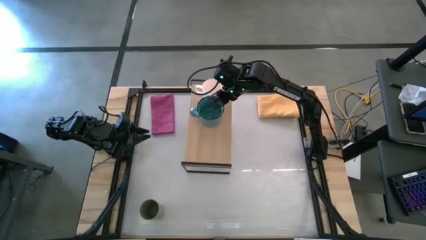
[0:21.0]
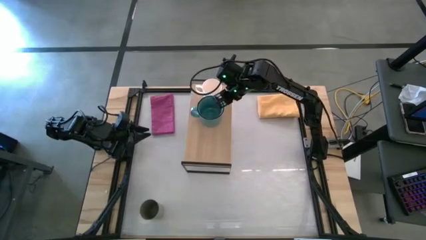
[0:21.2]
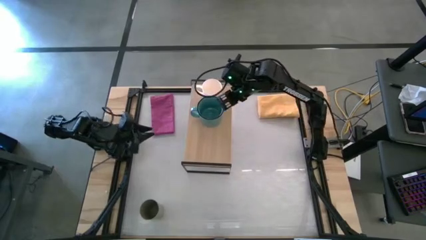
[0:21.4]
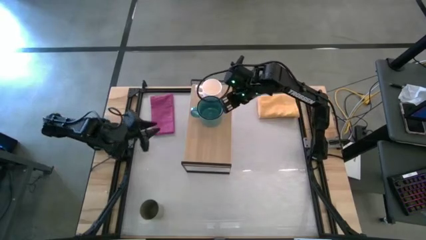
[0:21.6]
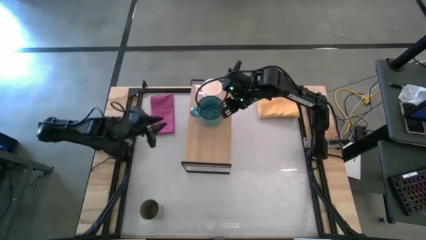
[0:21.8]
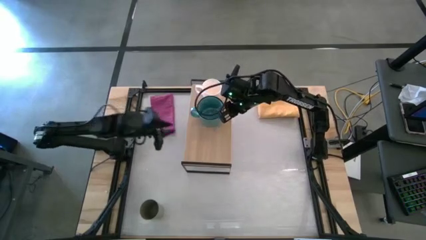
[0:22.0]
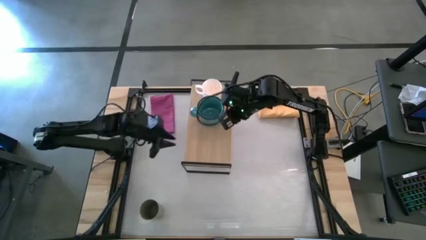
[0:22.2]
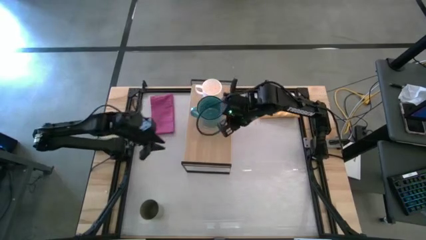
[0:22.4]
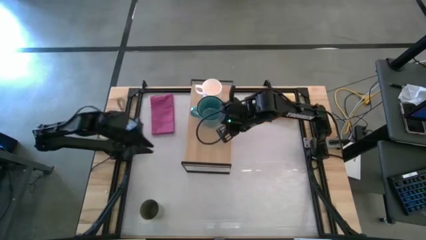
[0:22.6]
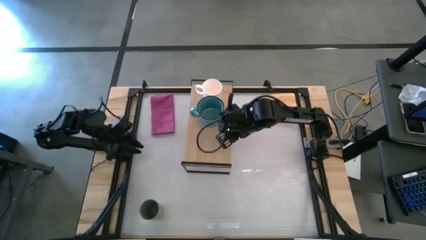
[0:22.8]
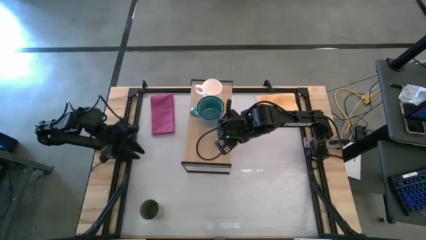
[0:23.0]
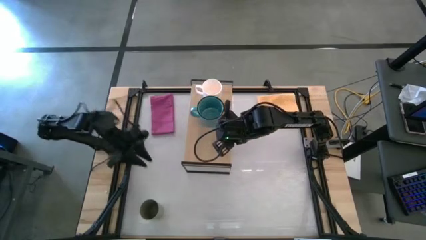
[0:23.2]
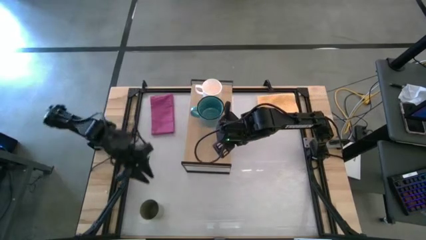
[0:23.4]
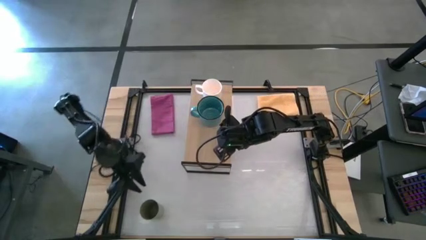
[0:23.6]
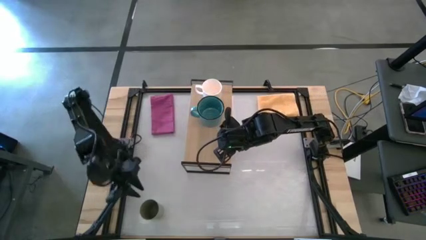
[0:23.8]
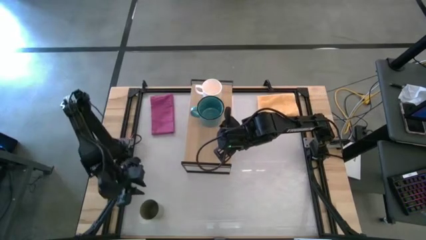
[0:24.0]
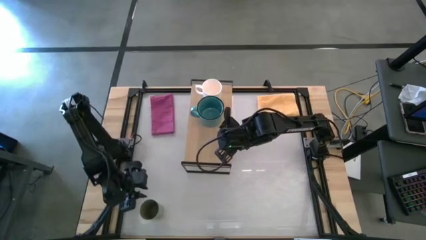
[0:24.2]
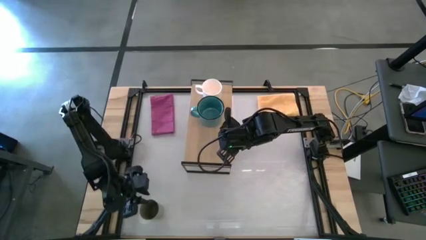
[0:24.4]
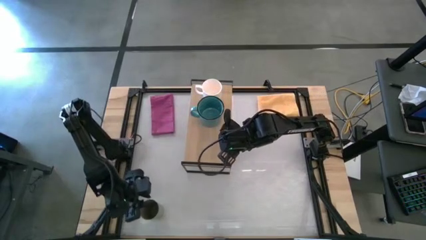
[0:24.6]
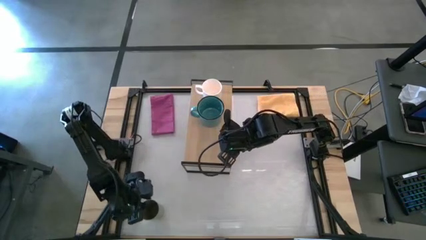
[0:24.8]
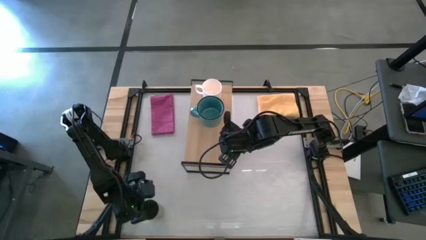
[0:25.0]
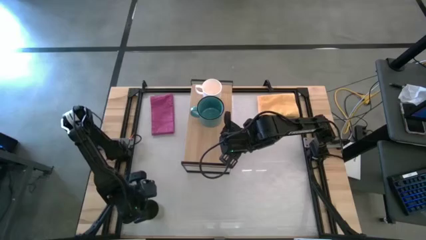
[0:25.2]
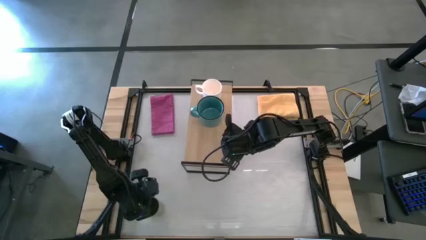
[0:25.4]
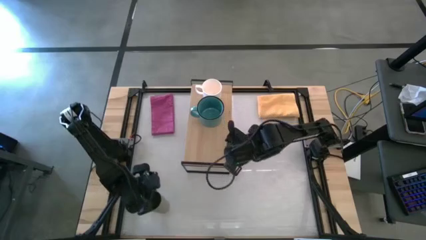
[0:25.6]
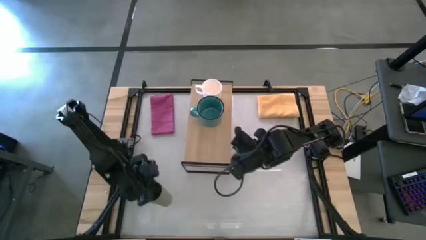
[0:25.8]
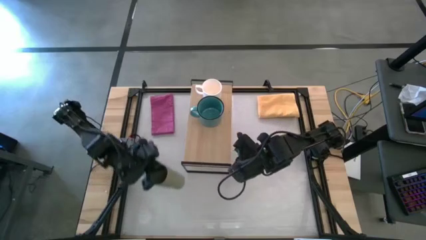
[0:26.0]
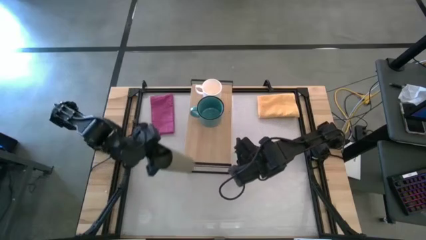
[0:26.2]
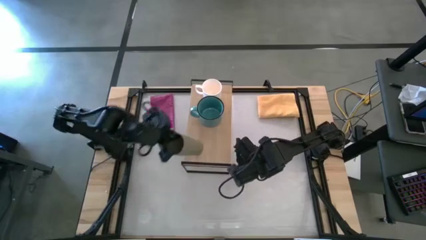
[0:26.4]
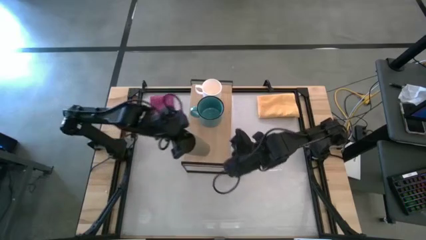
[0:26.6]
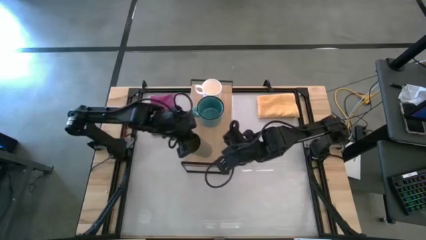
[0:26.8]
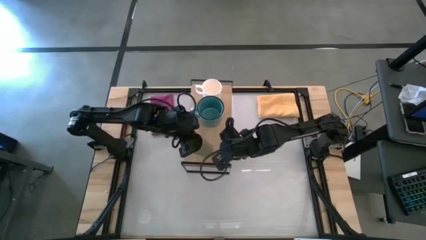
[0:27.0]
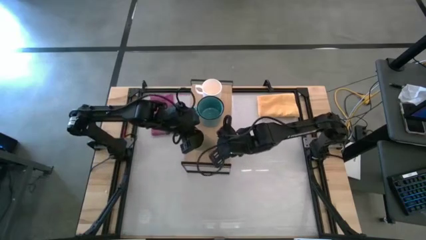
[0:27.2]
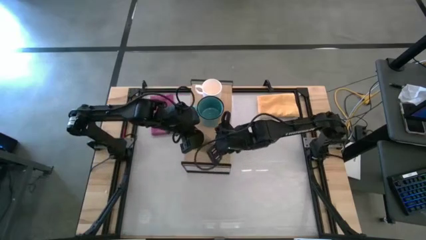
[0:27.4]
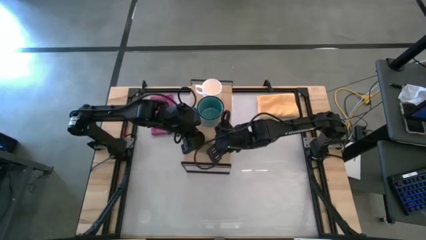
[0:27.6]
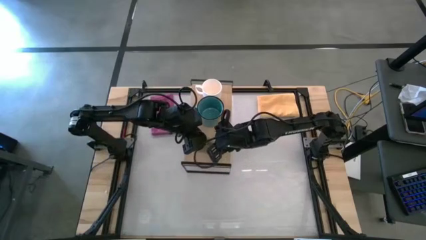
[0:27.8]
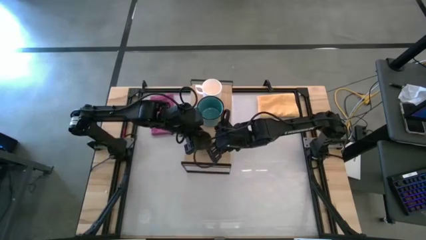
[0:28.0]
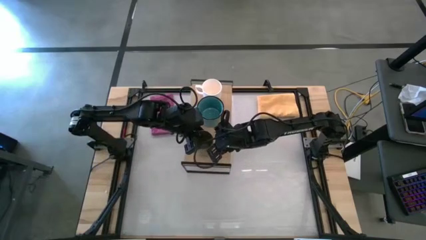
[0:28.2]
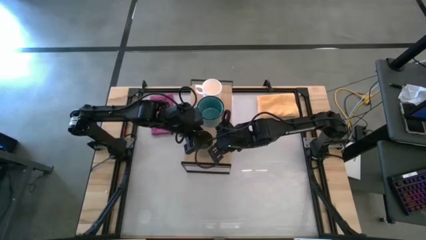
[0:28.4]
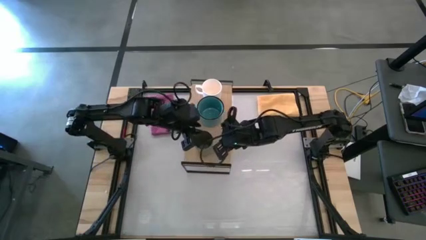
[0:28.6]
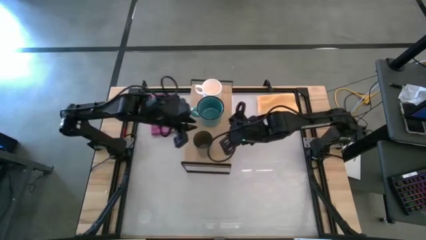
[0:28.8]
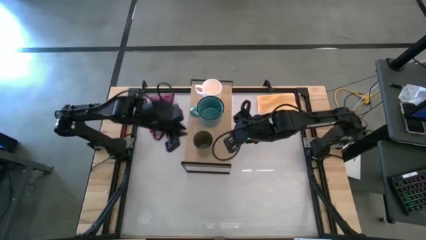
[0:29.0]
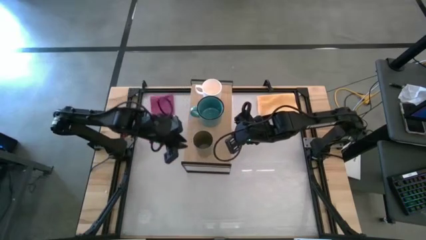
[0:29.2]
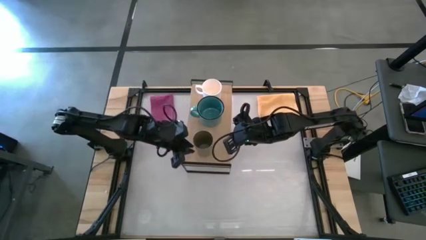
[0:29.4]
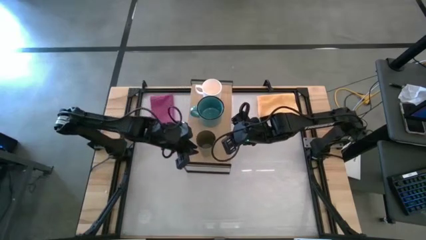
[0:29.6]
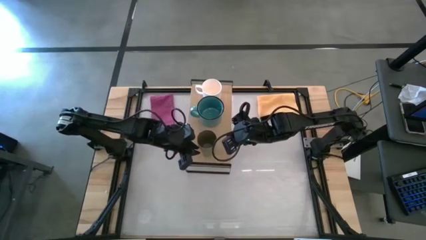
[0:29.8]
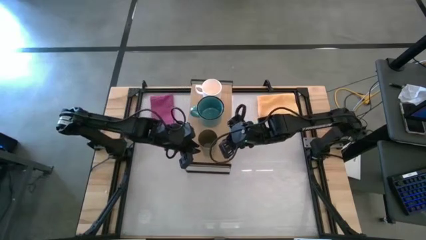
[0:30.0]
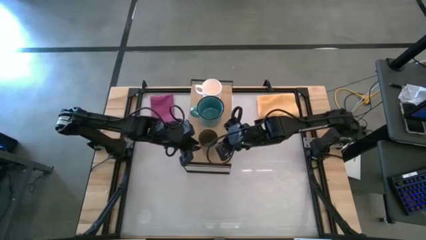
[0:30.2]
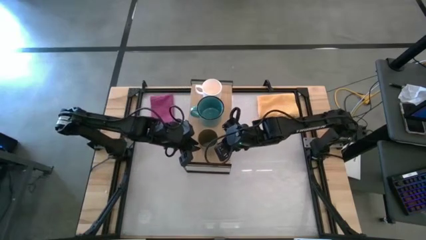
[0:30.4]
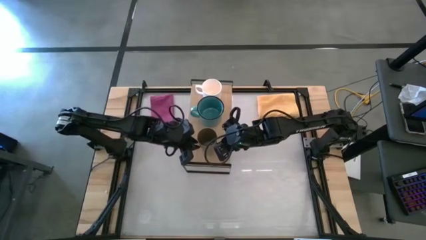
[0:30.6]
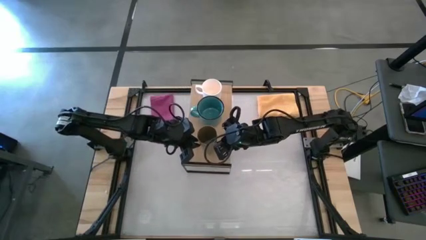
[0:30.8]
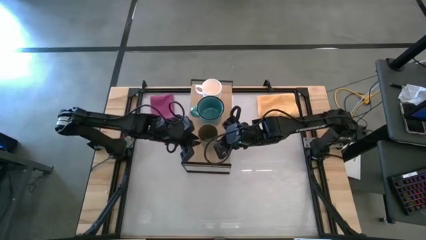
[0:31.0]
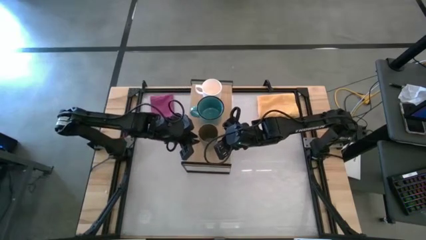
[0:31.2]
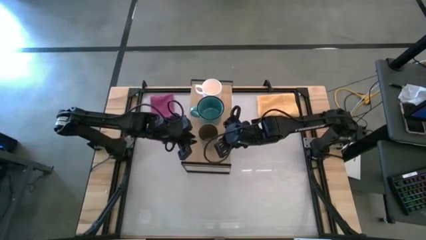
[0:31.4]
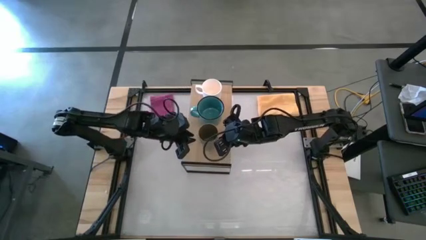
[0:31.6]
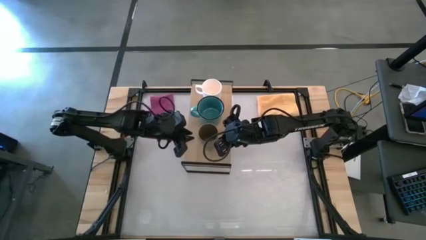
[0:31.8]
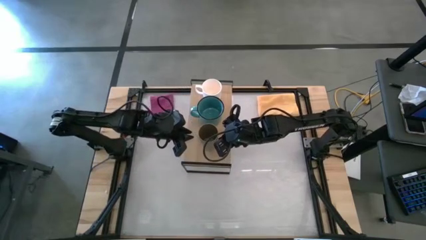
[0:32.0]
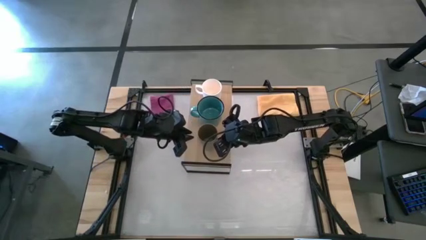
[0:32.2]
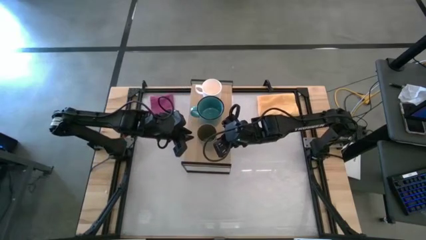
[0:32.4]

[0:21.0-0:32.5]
Task: Stack small to large cups/mugs on shelf
Put the gray cup on the shelf

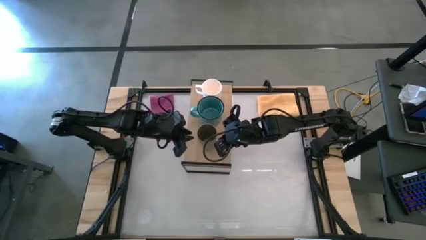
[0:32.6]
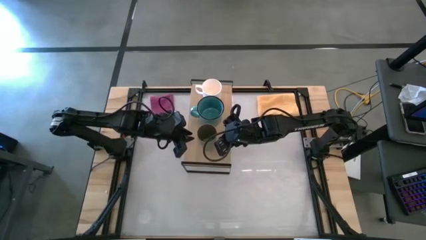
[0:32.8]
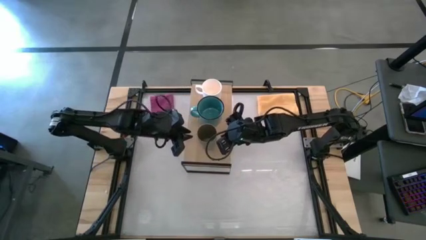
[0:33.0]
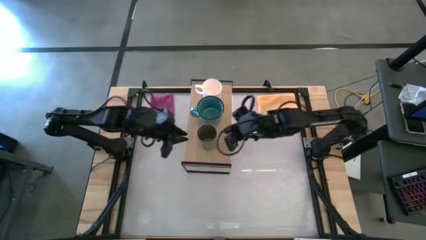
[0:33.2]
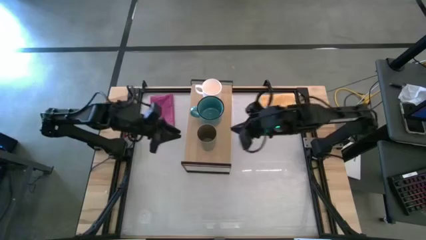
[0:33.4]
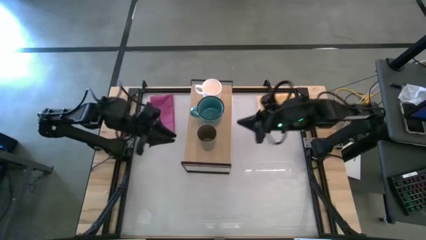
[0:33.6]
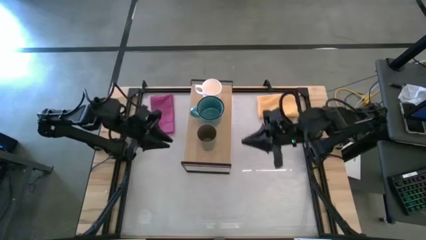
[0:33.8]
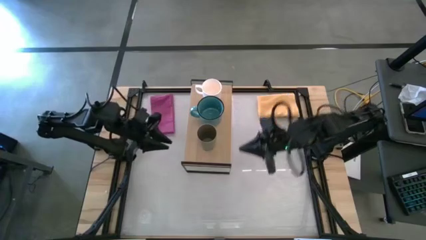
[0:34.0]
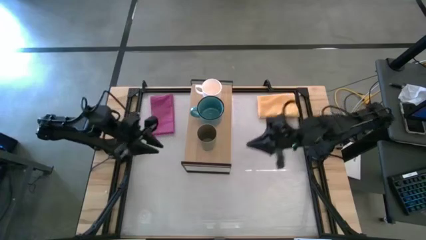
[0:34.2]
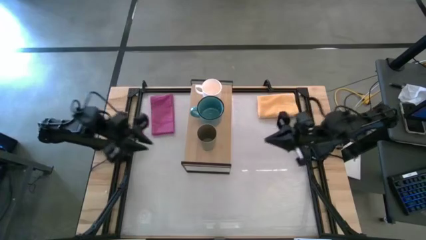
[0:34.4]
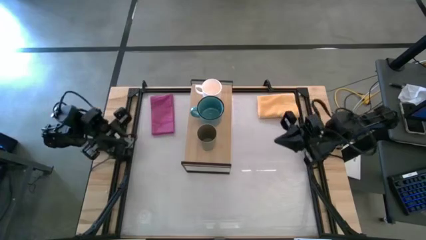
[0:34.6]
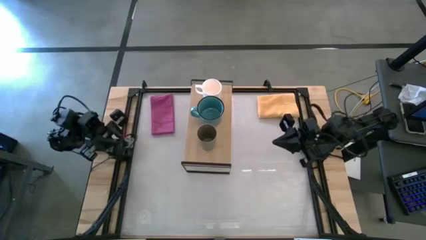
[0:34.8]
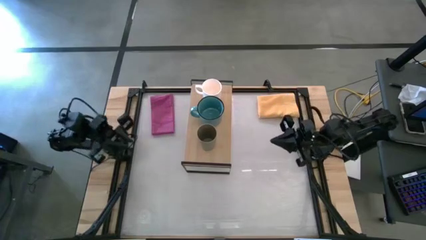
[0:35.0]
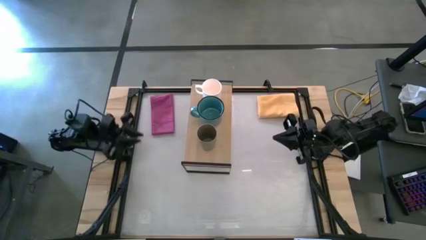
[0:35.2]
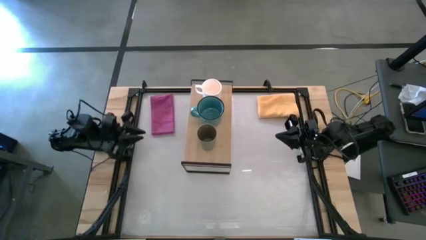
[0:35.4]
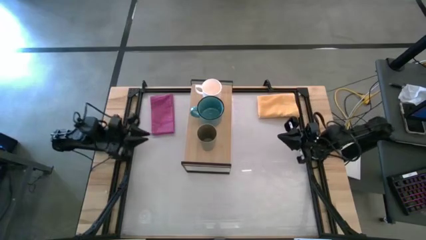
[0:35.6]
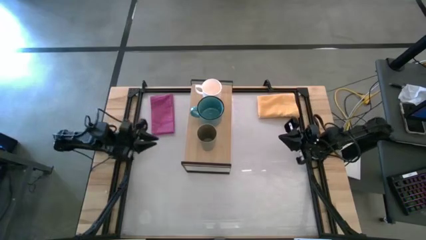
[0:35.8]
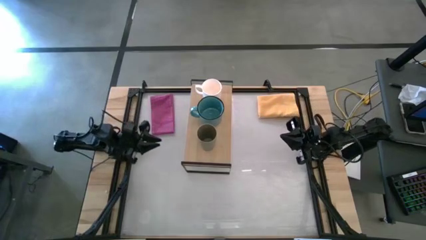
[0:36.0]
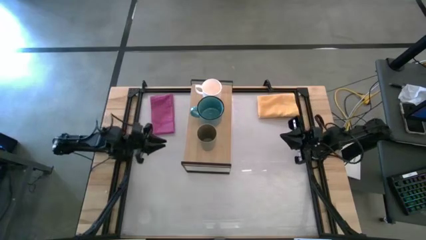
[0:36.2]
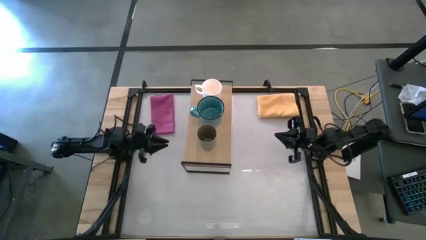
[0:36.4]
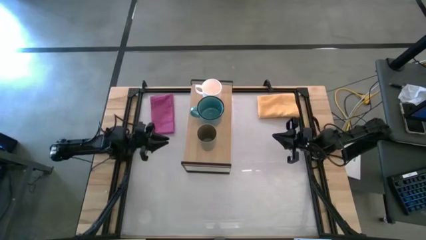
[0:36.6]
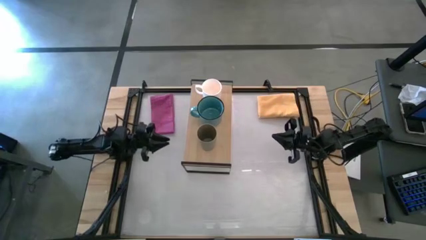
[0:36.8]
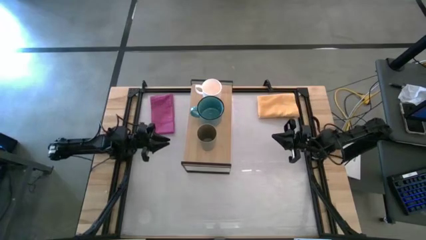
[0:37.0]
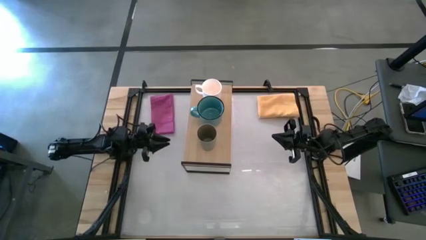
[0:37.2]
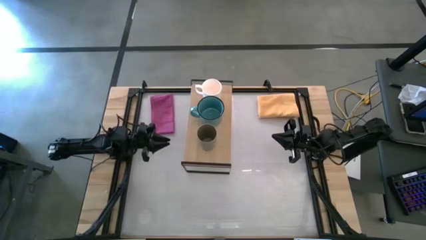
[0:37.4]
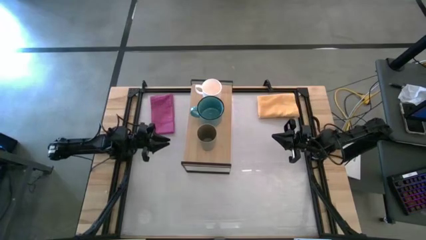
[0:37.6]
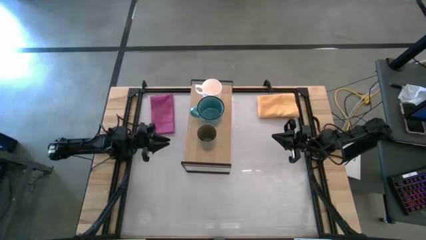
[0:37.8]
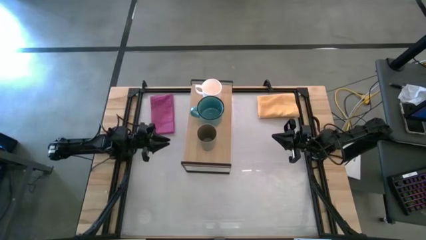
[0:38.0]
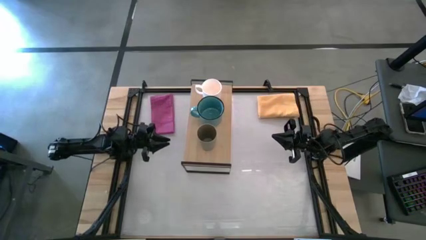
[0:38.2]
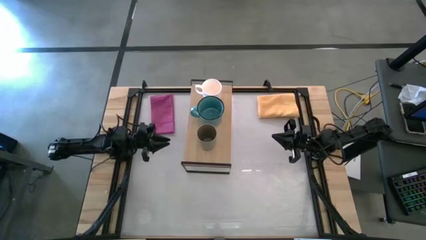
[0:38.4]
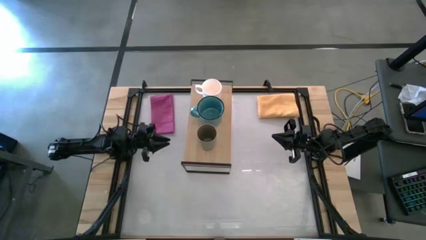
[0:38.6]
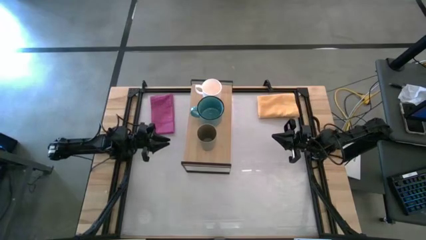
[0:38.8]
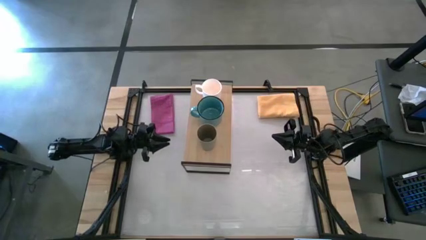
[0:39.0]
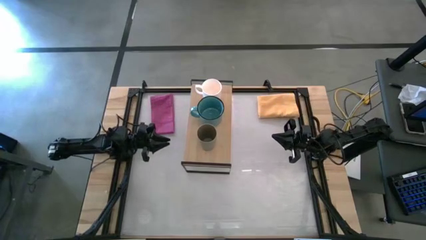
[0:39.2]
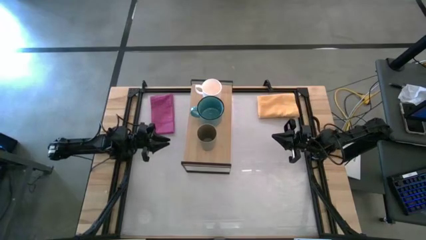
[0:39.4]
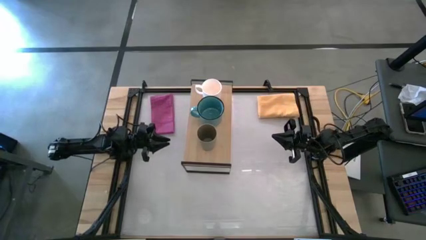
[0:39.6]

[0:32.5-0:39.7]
Return to Home Position
